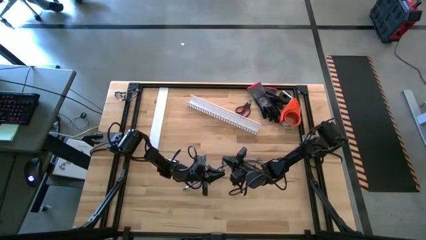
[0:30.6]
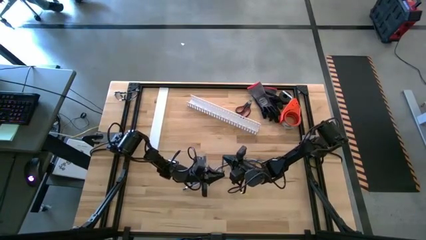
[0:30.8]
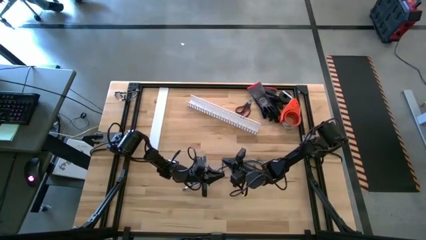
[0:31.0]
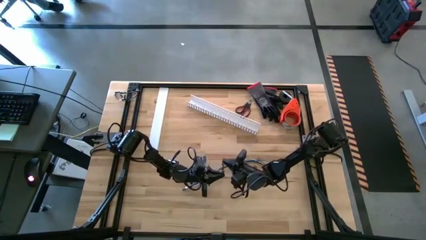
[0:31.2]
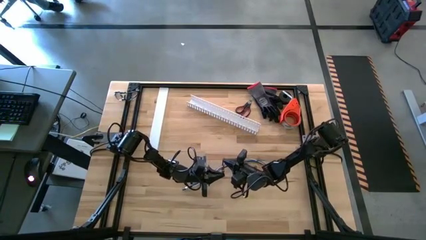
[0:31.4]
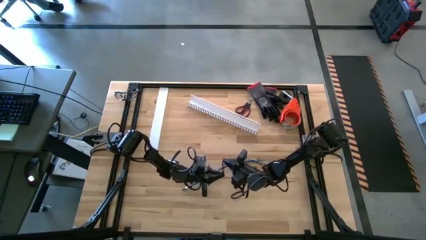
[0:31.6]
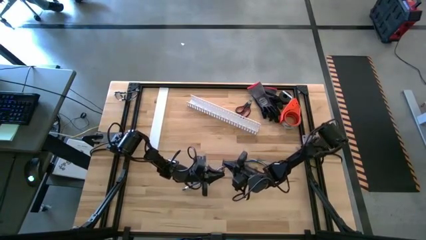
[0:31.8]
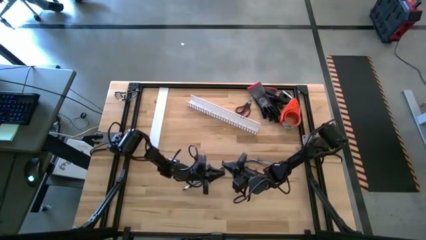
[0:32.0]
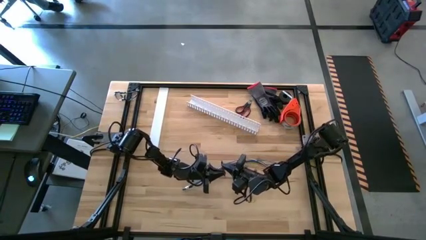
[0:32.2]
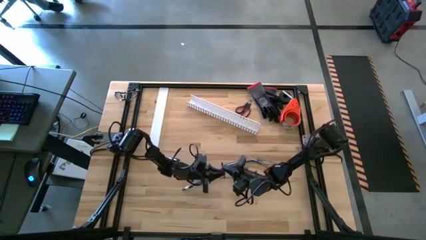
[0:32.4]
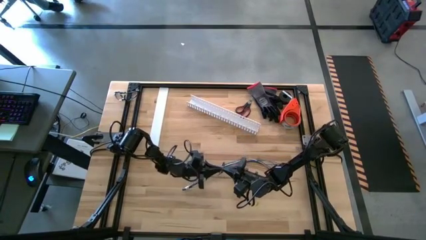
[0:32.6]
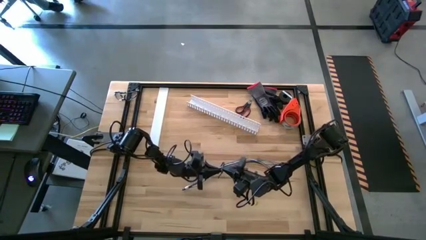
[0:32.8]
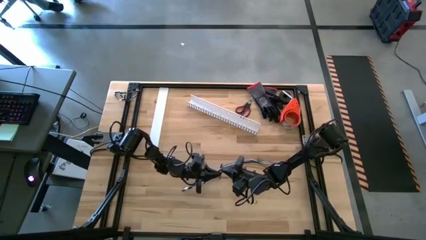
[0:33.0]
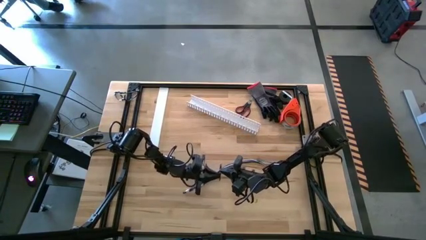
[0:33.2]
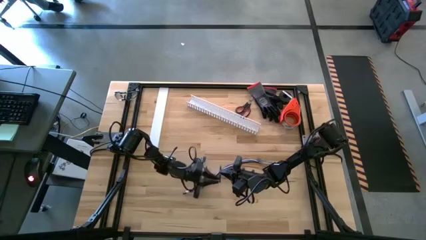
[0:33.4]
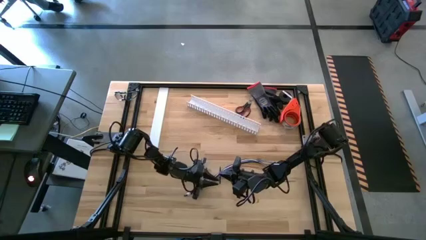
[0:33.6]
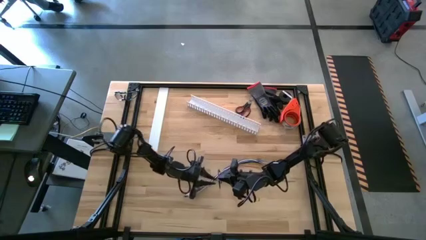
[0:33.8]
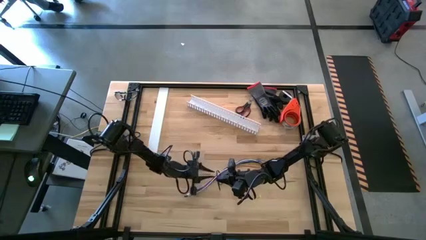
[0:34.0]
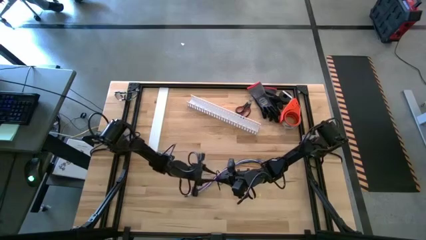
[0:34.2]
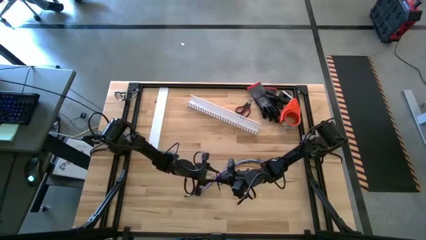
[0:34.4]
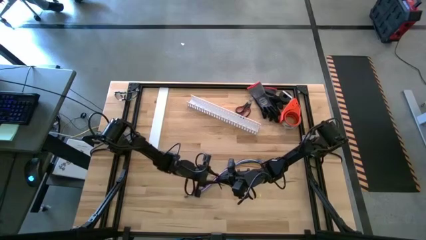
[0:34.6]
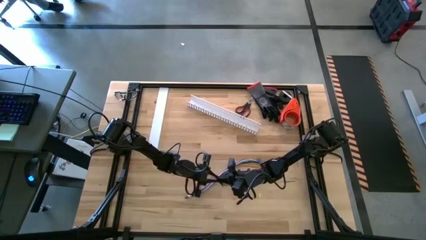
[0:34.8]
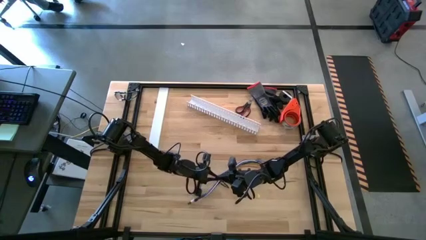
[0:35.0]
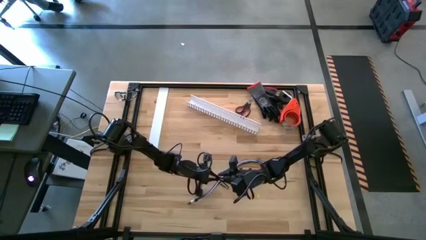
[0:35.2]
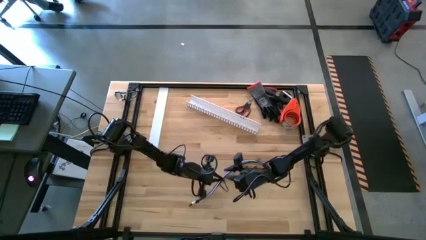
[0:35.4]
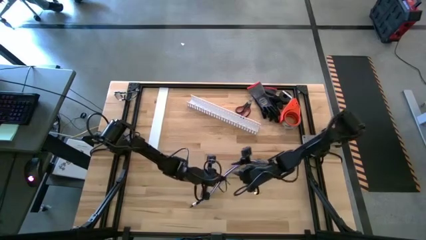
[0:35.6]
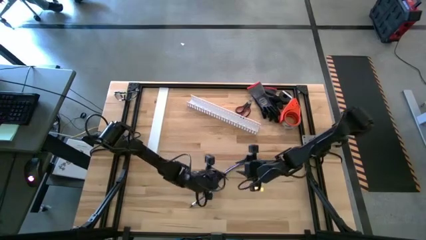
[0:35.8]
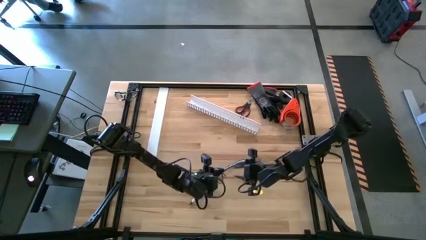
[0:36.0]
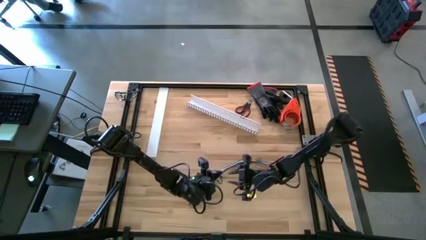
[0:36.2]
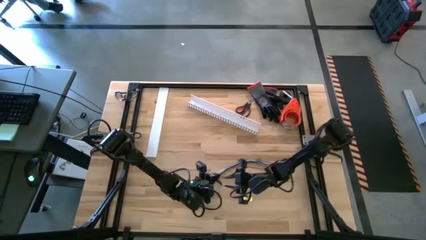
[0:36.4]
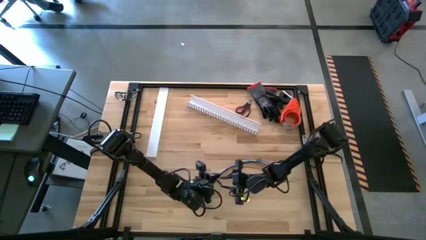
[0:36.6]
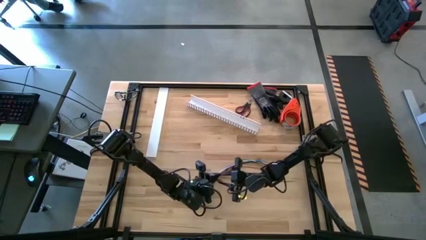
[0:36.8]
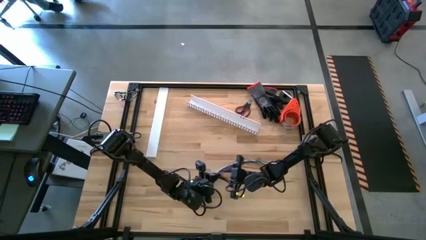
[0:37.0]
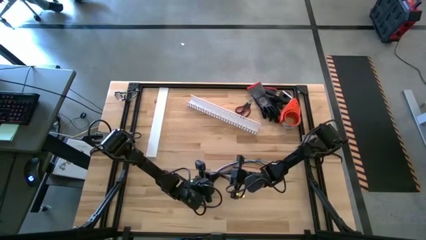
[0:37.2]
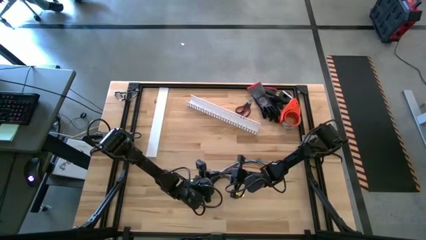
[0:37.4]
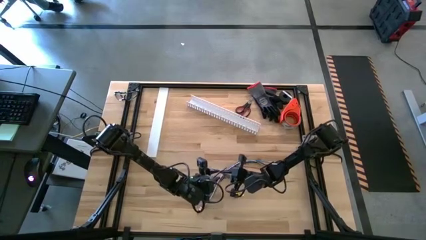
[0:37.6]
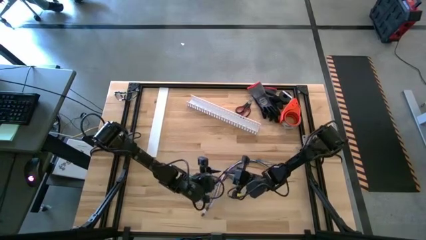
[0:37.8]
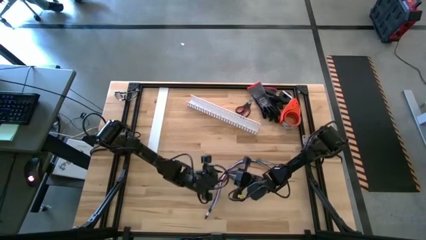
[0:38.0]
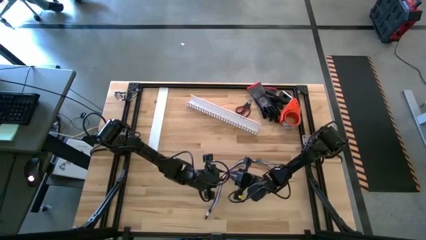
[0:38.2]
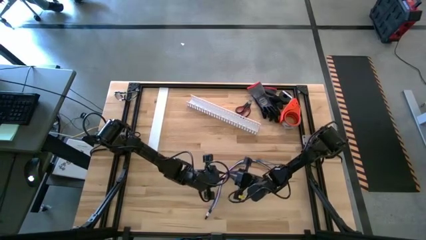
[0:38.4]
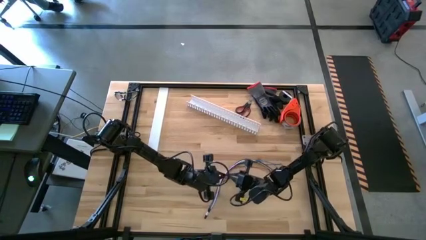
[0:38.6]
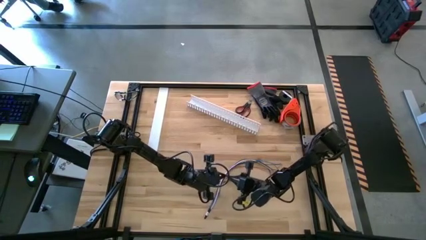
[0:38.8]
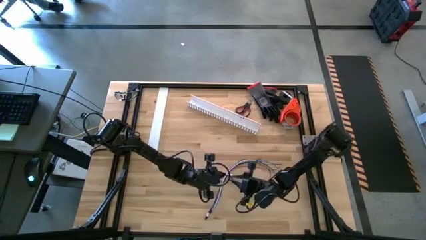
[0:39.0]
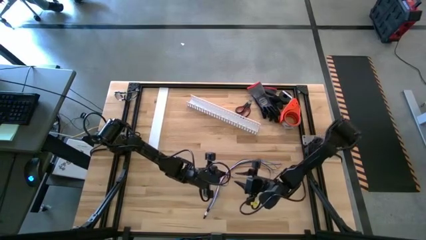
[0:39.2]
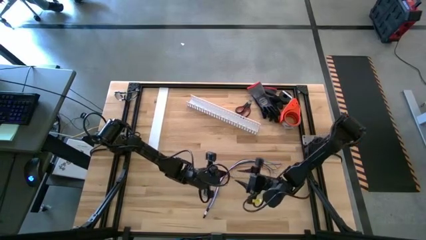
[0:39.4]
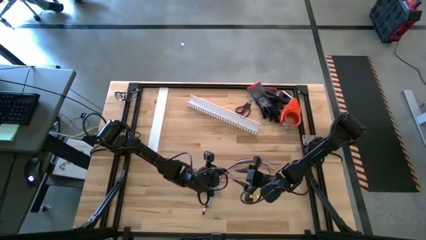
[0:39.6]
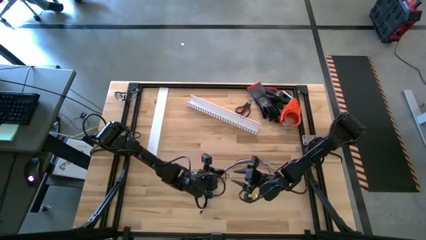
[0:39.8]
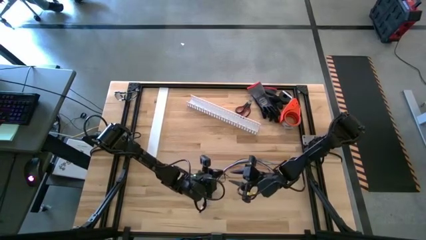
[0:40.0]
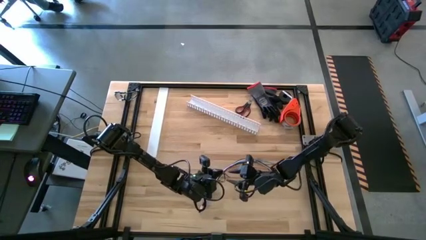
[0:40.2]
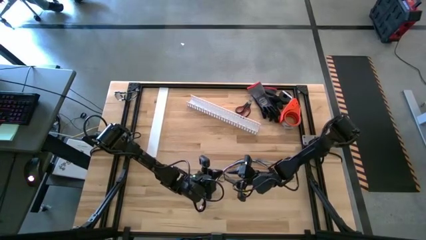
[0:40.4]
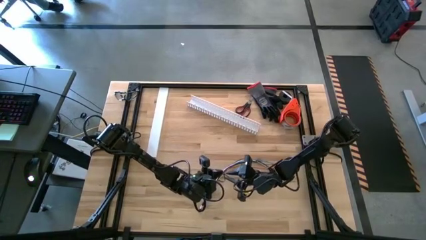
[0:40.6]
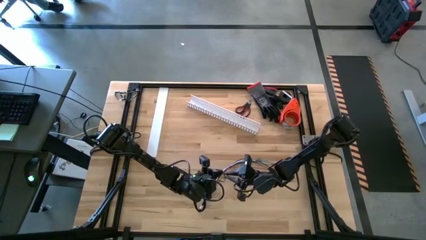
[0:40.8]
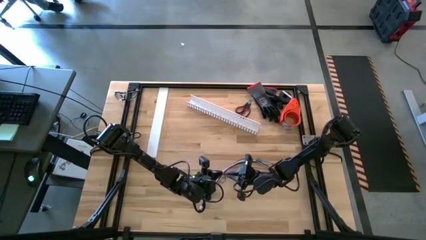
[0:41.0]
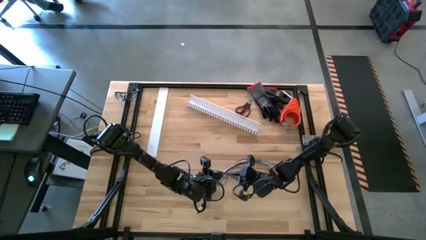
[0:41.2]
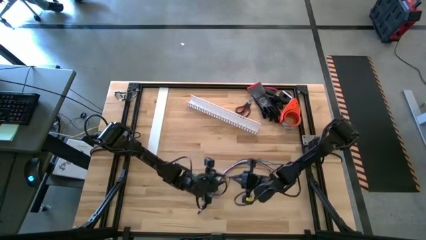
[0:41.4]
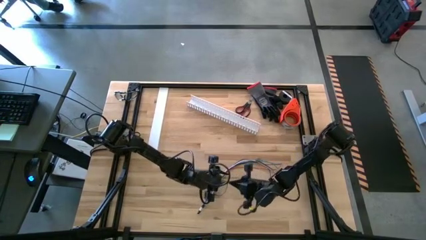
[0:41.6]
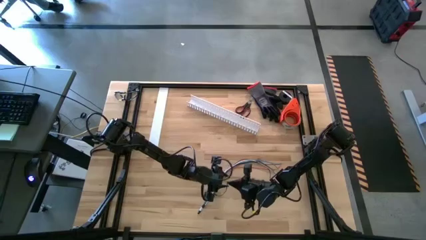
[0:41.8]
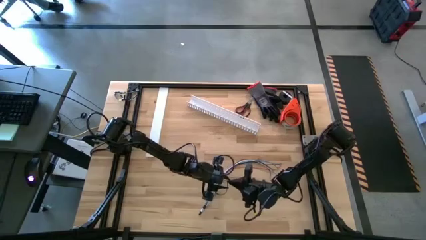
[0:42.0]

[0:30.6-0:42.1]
Task: Ziptie cables
Wrap the black zip tie on the cable wires

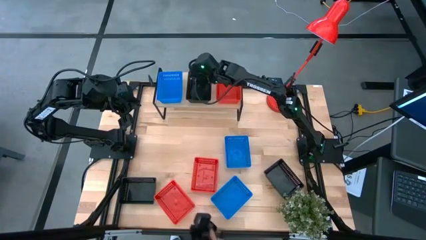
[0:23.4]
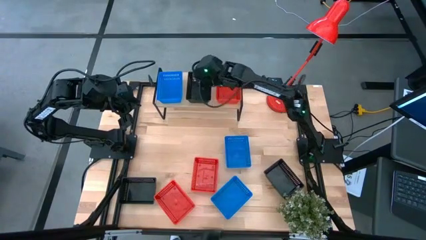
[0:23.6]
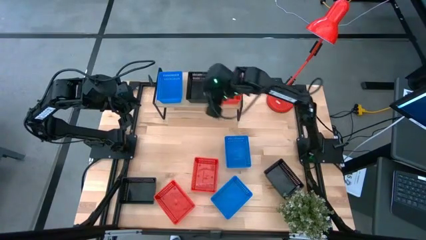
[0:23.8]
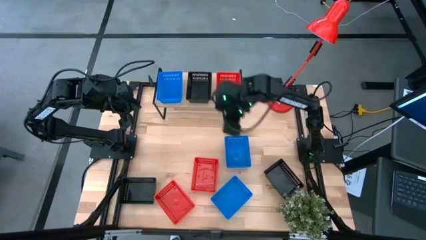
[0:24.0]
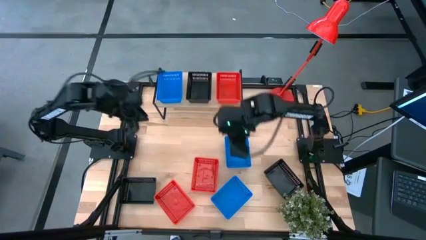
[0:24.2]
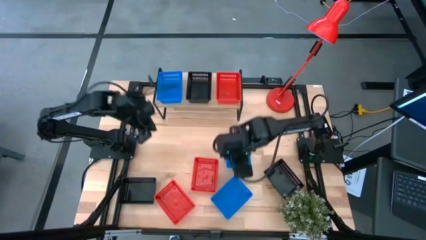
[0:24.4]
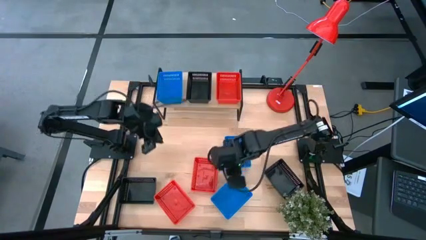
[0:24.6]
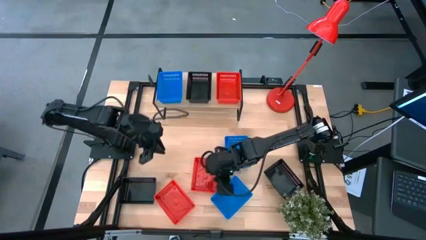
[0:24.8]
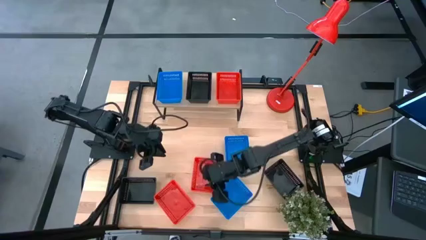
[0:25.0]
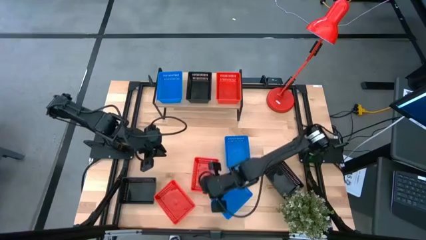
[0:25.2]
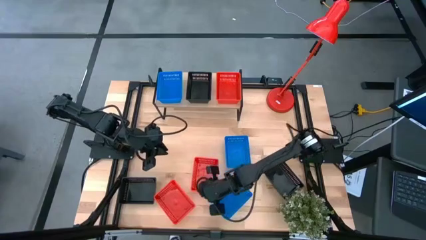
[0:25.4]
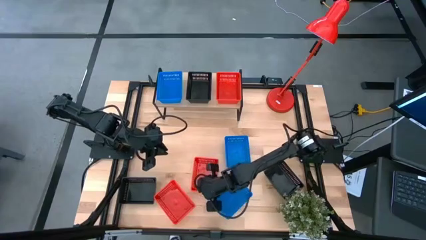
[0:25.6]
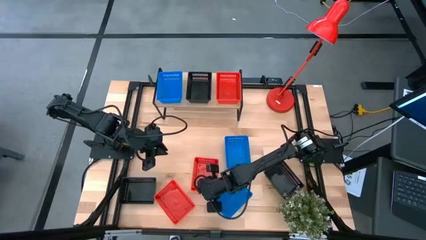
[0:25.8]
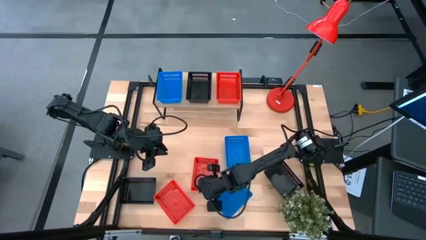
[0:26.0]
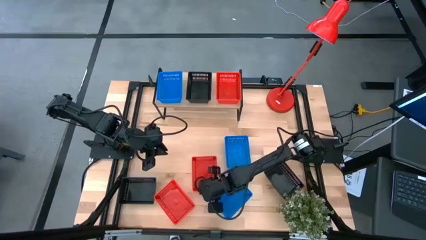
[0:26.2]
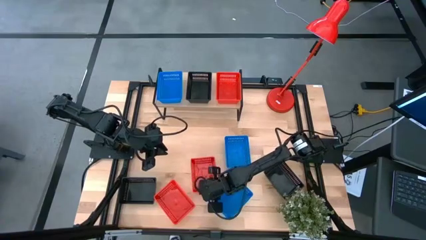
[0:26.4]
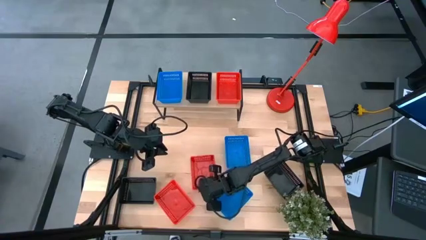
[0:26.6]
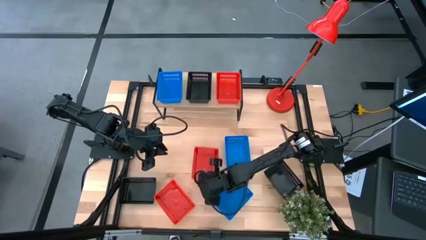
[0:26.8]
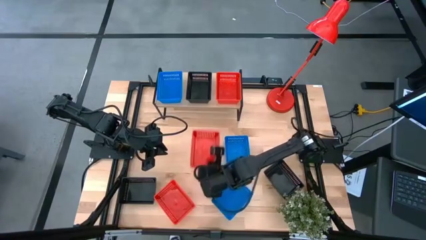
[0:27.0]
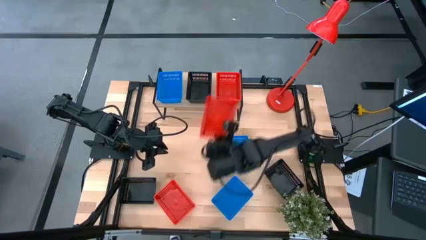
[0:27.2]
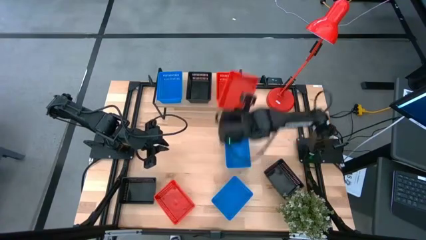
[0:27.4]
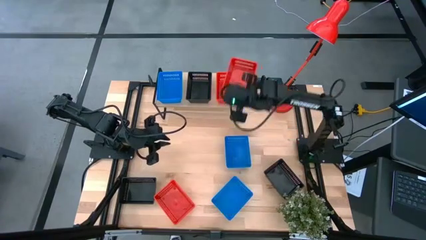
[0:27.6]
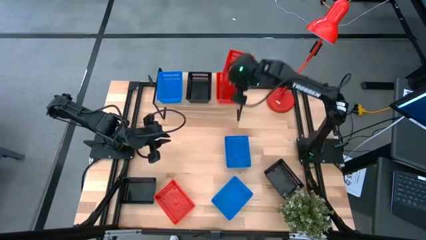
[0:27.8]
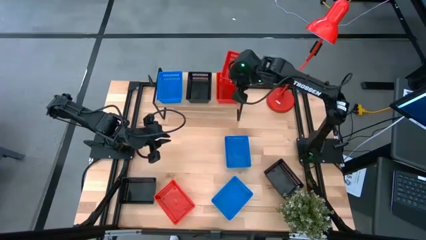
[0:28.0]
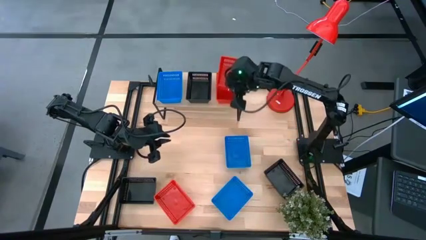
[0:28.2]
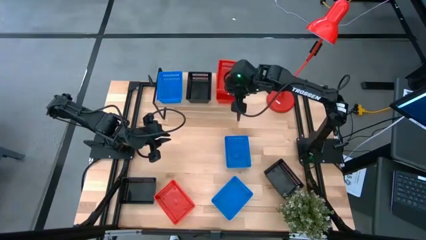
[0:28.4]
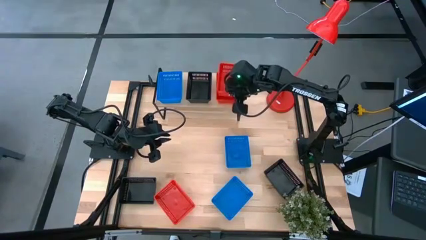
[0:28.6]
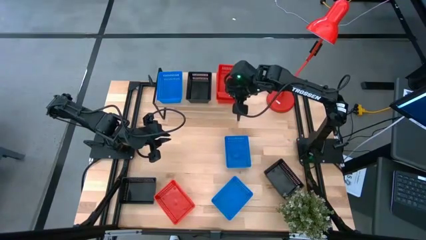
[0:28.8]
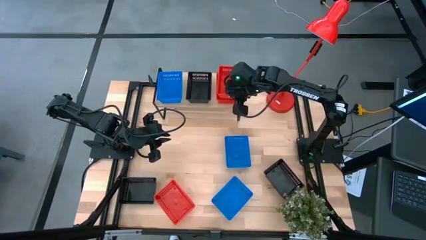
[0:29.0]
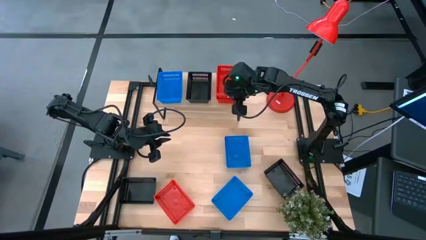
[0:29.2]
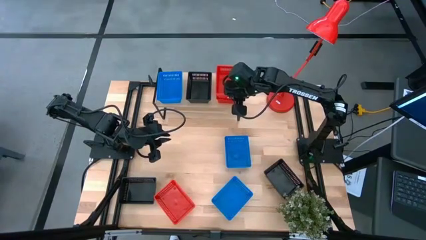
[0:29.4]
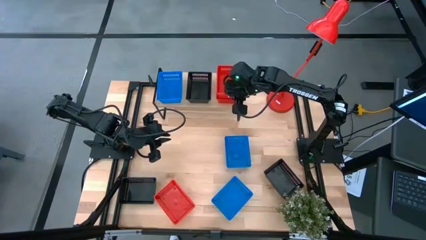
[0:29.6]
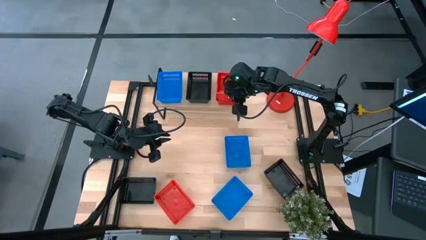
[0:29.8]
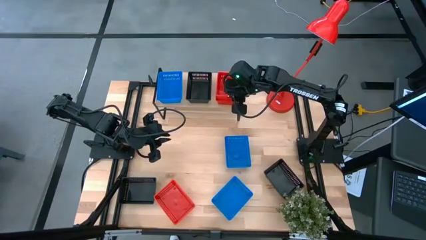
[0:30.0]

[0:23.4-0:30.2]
Task: Stack baskets on shelf by color
Stack the right red bin on top of the red bin on the shelf
